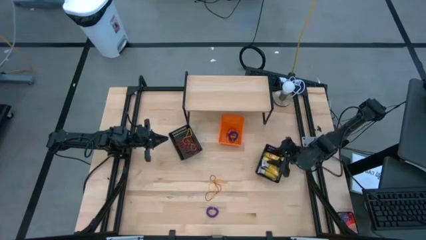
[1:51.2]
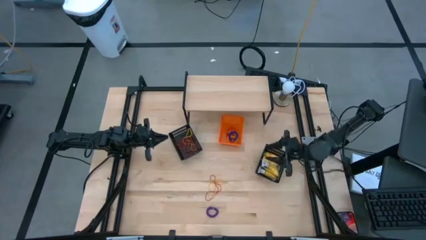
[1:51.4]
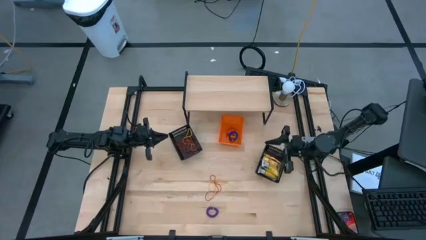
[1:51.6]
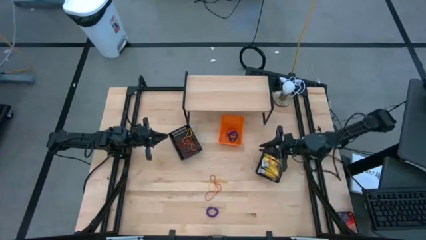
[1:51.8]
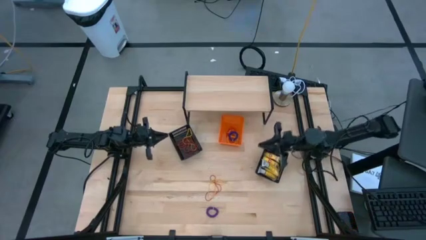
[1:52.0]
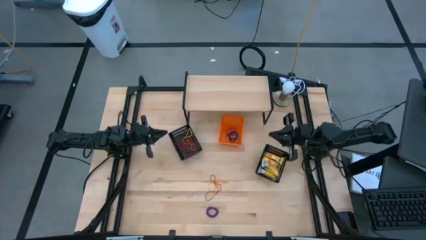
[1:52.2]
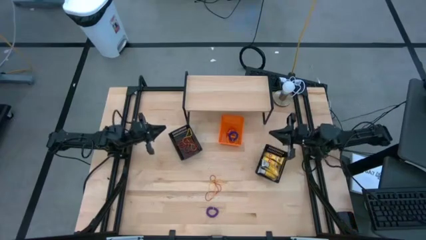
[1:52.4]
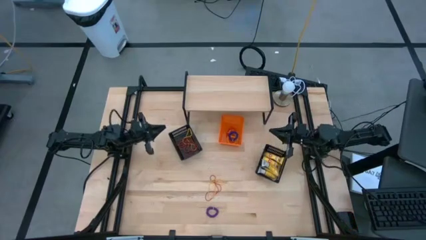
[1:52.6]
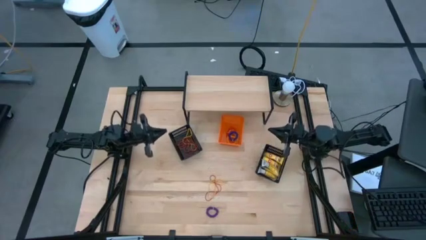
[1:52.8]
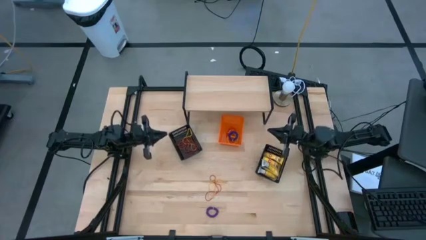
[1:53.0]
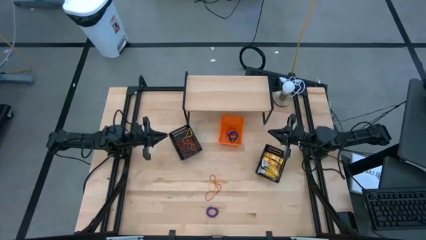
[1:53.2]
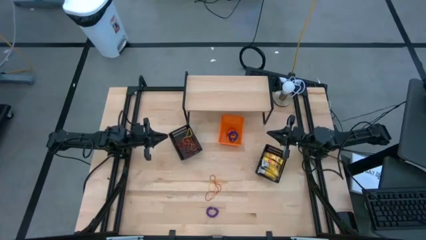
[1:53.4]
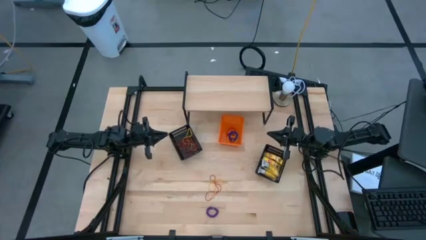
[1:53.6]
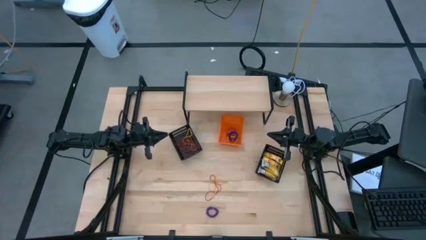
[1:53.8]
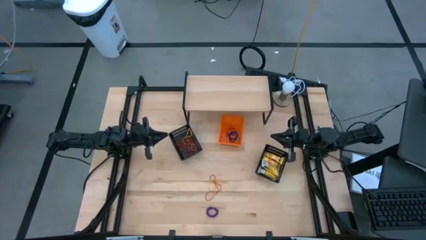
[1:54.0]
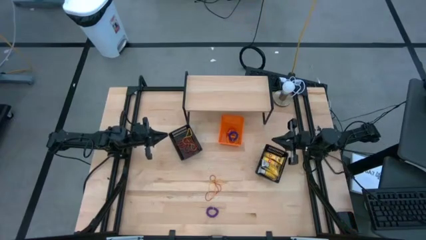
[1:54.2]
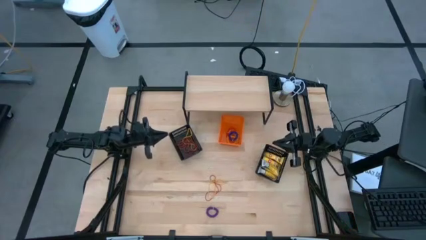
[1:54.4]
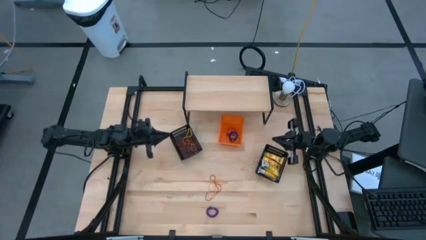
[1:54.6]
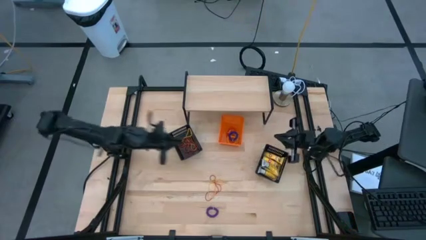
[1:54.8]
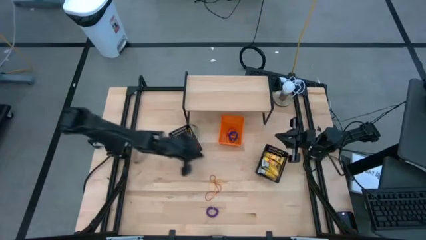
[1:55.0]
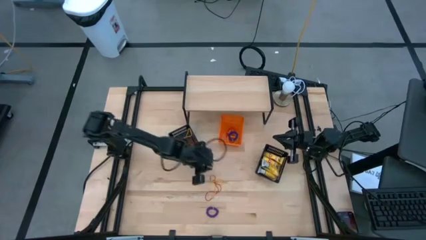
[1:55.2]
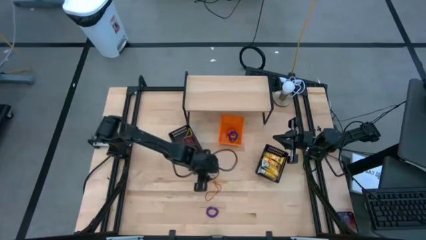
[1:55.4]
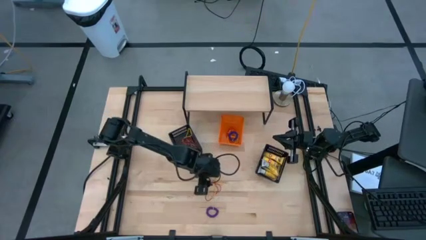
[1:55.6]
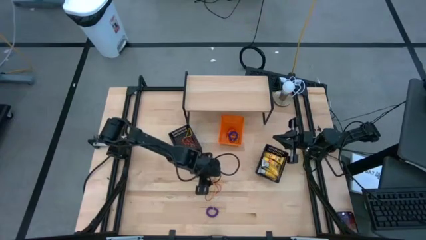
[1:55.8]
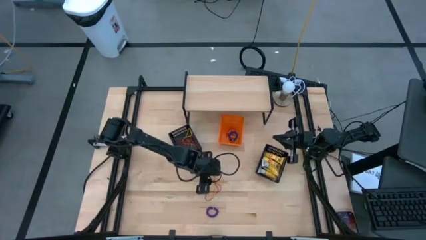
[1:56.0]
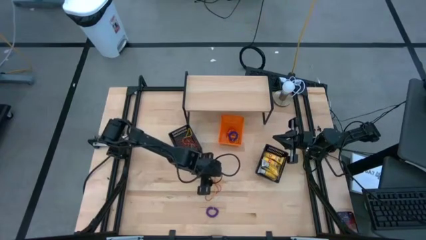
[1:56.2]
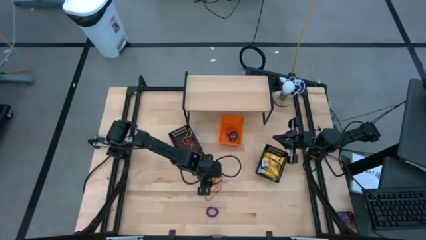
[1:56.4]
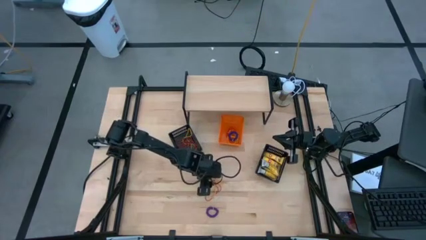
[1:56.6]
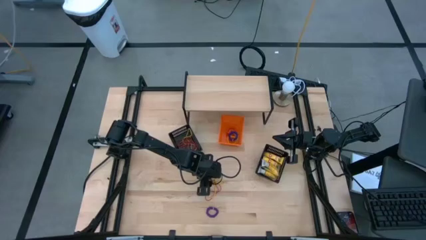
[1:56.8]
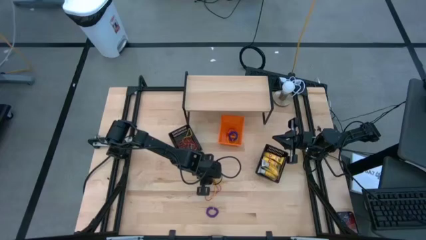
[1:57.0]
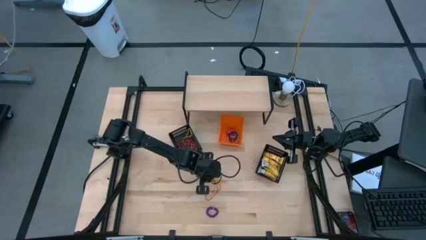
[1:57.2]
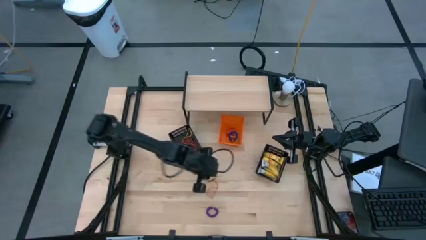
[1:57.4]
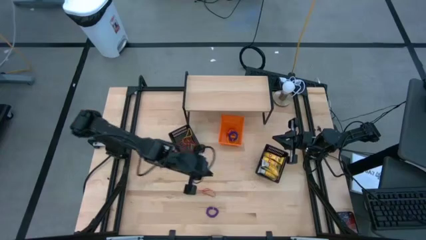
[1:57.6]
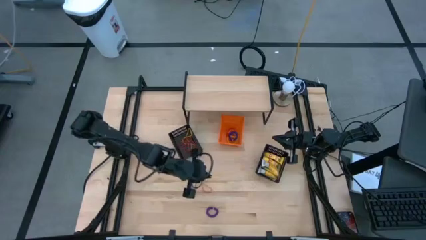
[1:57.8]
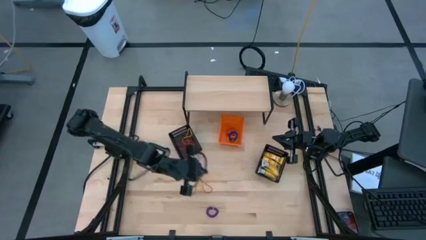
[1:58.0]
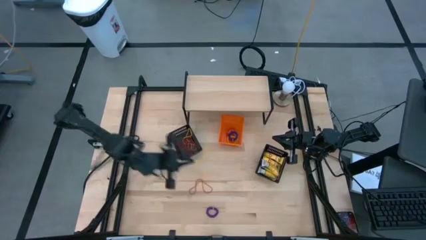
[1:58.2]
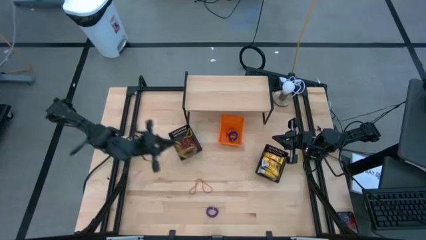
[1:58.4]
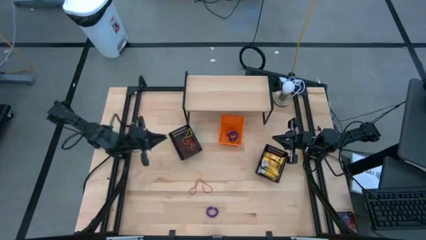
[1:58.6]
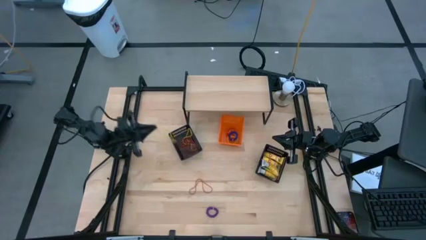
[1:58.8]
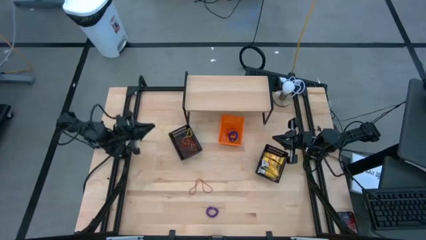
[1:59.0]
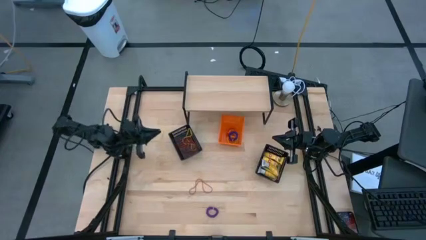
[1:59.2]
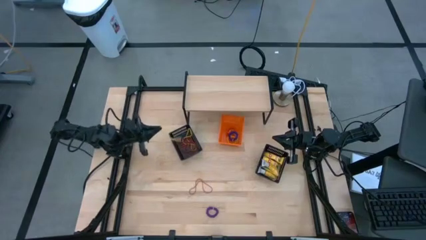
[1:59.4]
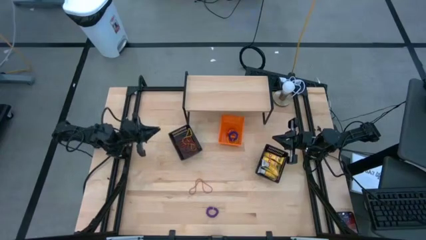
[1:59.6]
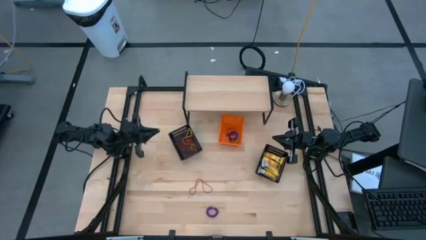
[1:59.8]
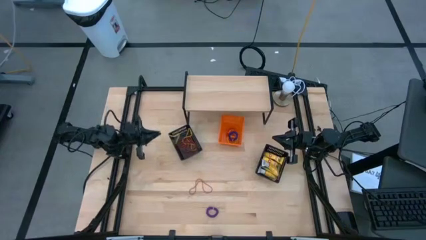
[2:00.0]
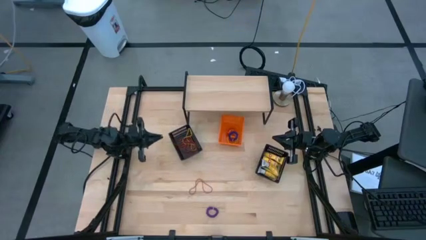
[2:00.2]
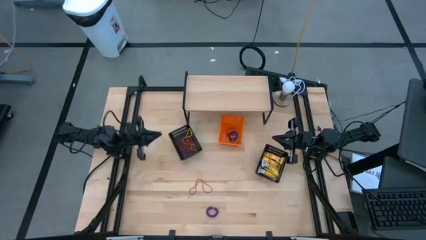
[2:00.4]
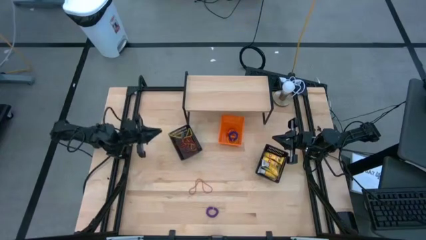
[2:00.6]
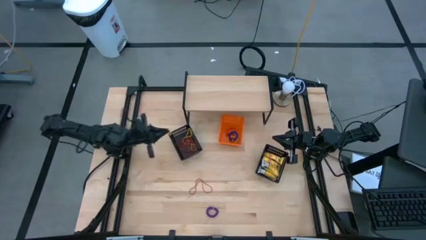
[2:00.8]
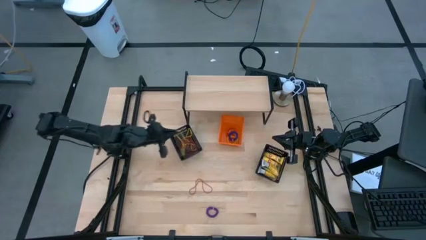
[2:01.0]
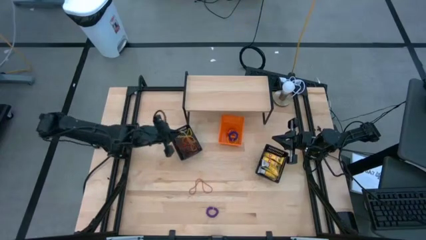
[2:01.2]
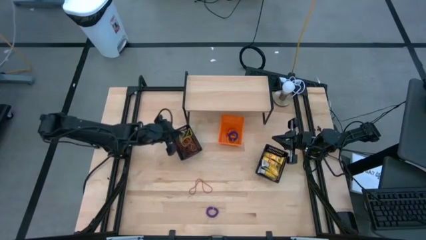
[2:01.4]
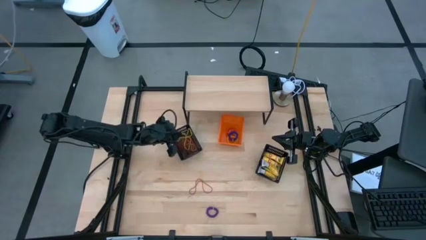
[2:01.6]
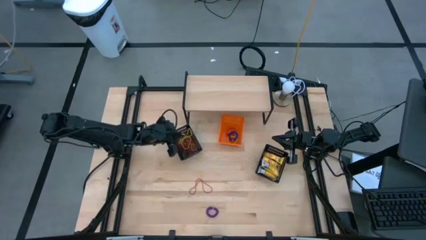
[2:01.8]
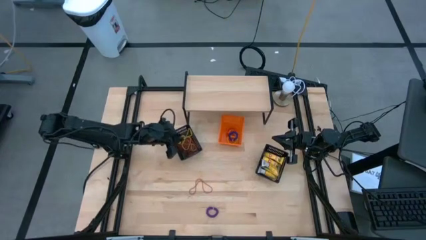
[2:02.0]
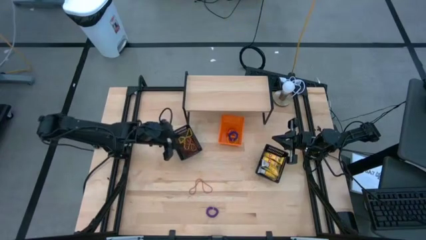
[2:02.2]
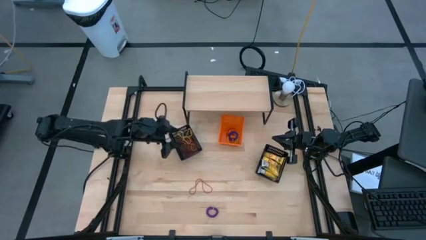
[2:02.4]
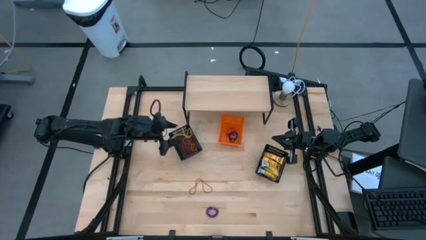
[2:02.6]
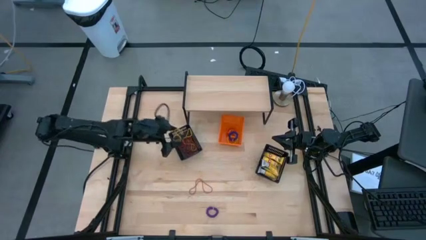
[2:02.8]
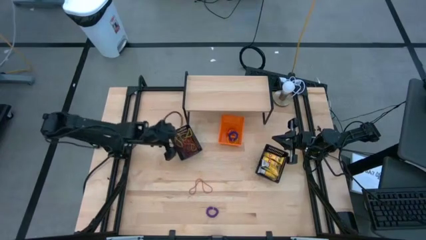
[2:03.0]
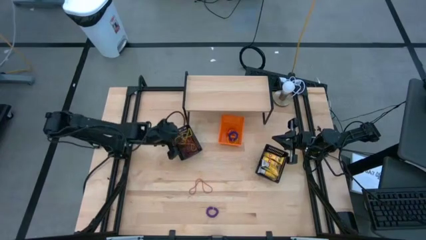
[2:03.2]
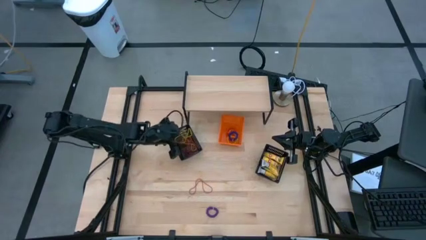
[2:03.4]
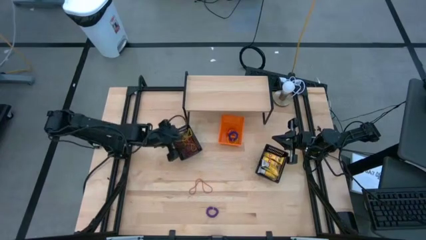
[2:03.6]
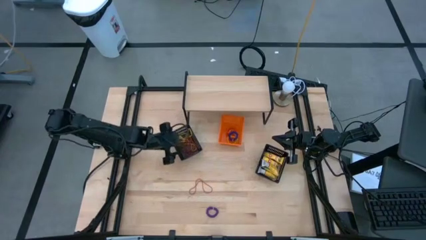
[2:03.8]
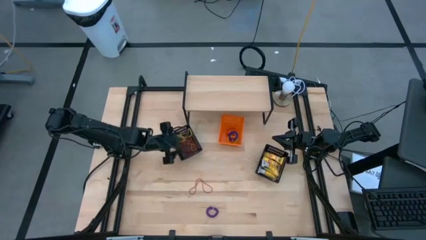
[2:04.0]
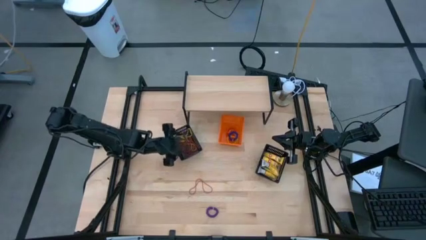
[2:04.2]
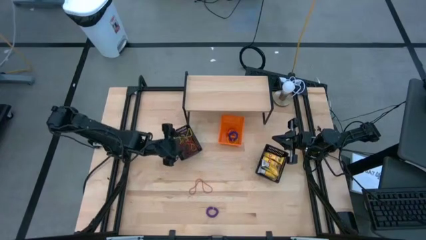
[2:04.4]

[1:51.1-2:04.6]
Task: Pick & Place Office Desk Supplies
Put the yellow rubberband into the left black bin
